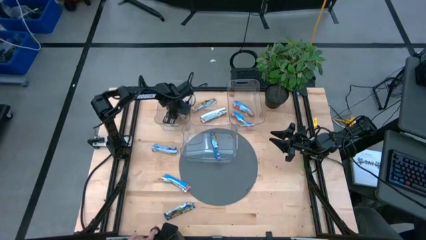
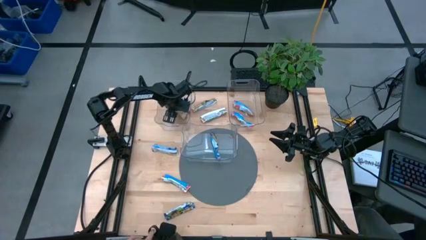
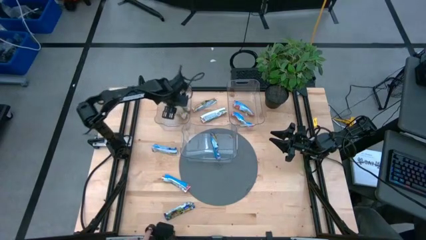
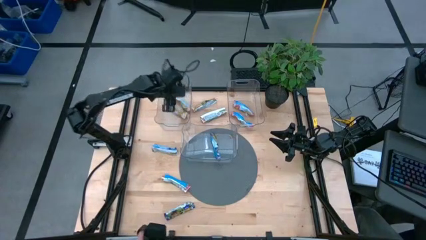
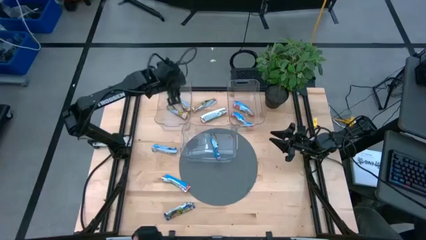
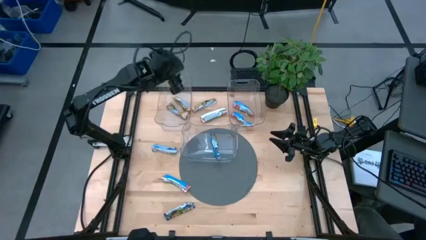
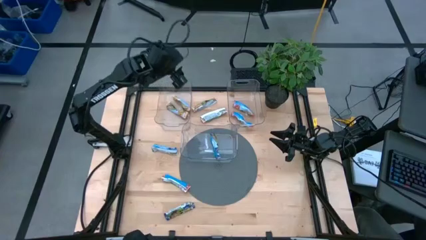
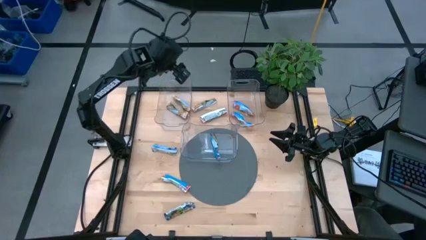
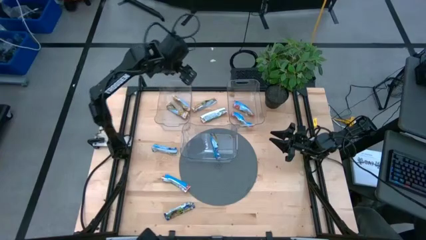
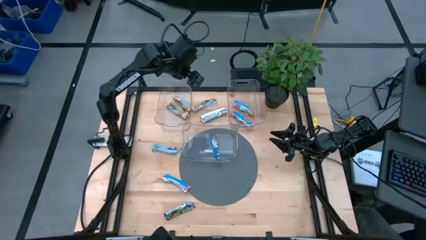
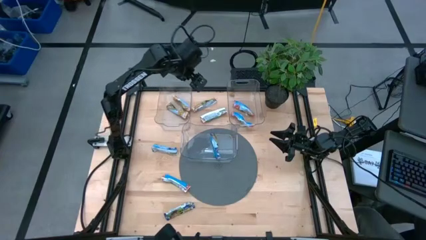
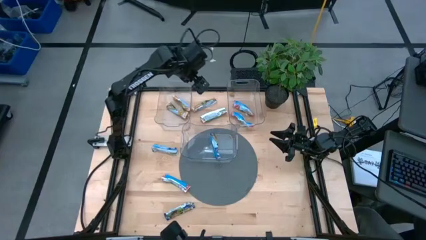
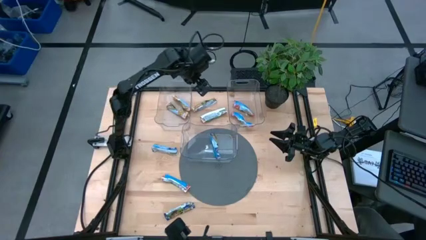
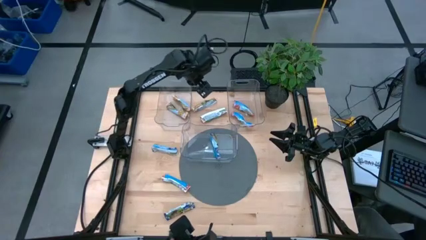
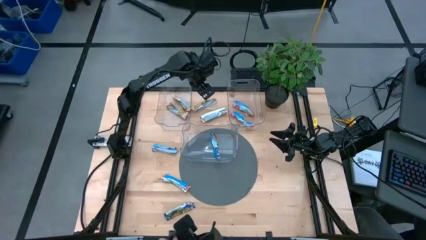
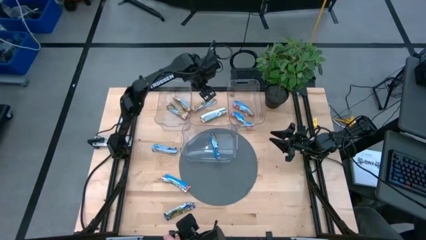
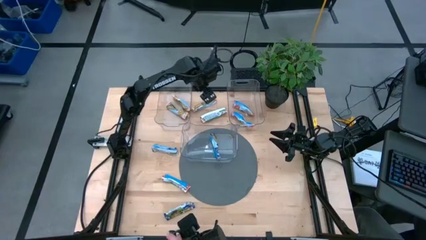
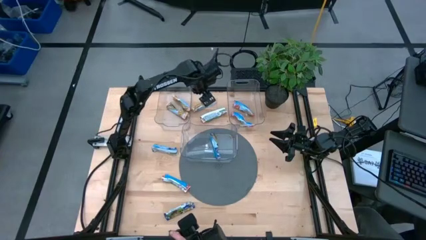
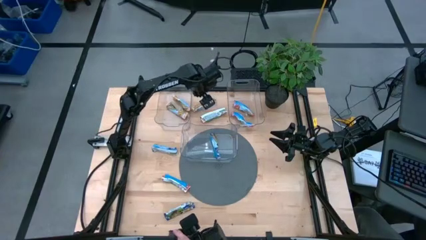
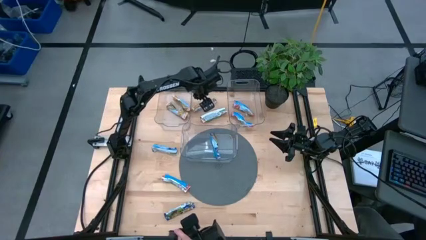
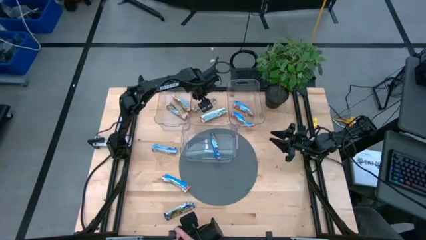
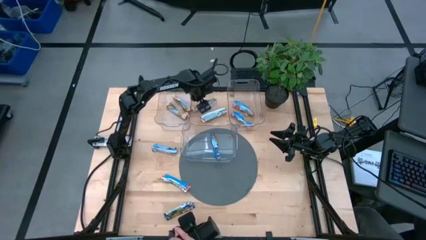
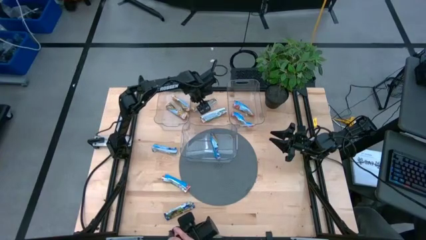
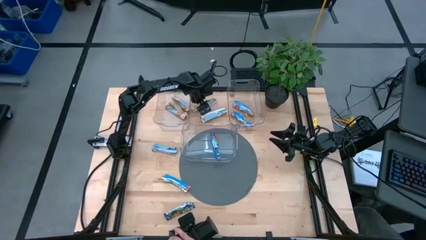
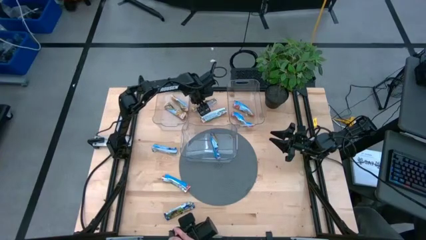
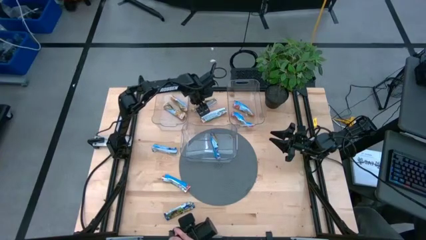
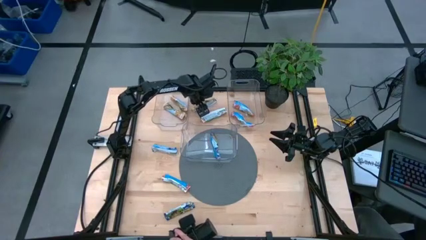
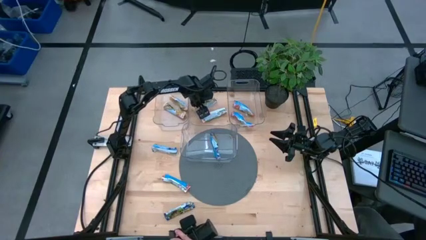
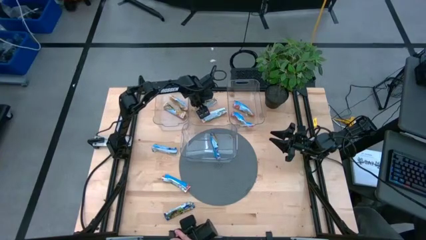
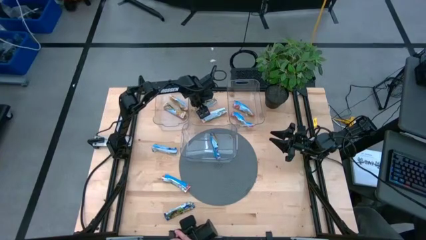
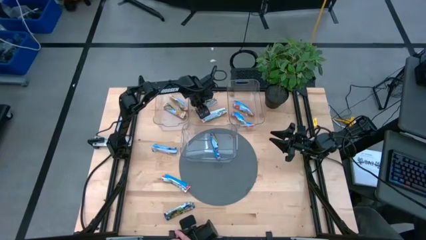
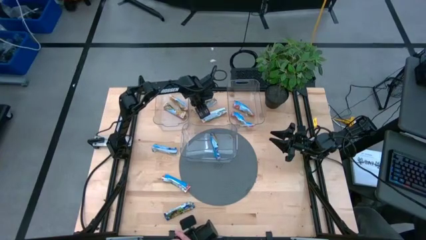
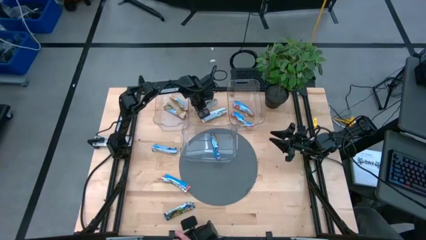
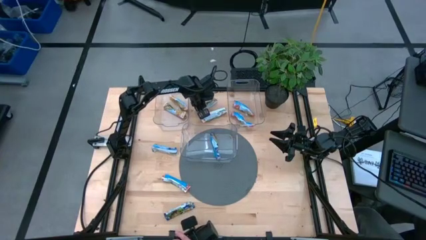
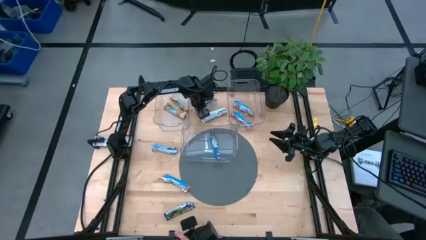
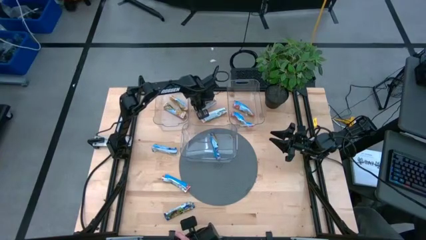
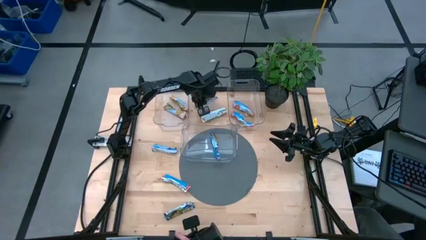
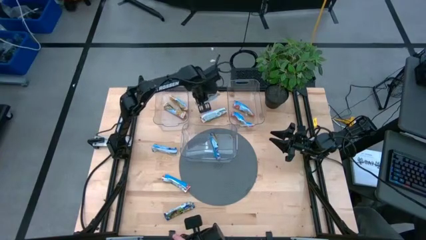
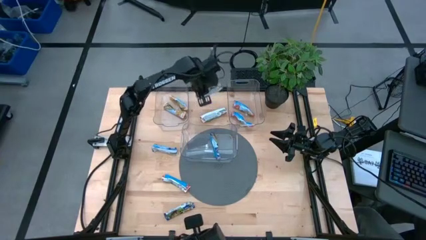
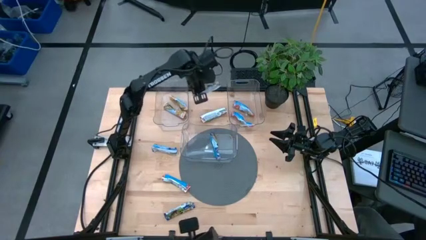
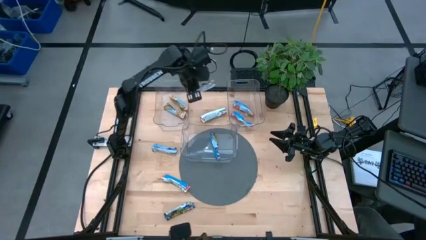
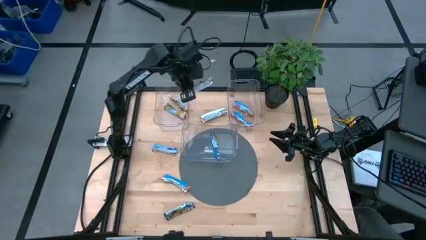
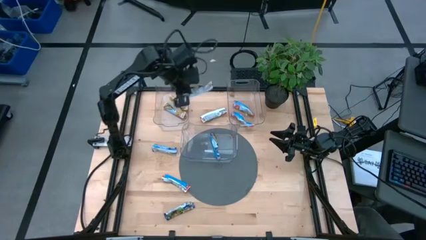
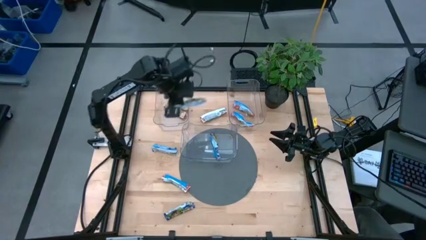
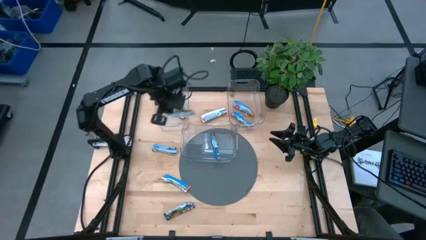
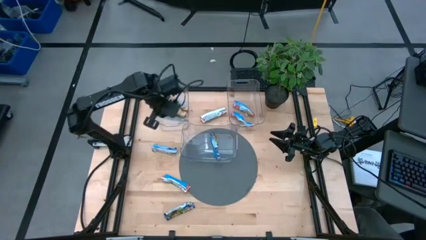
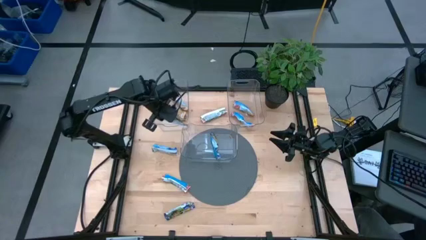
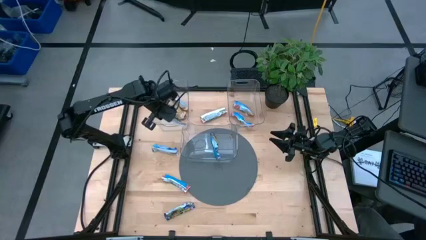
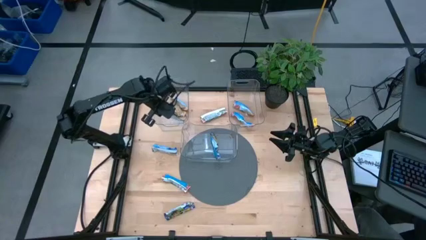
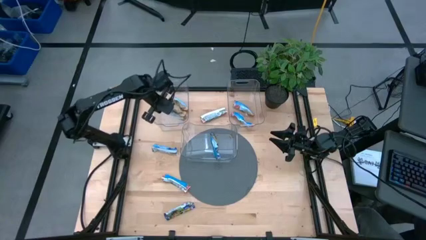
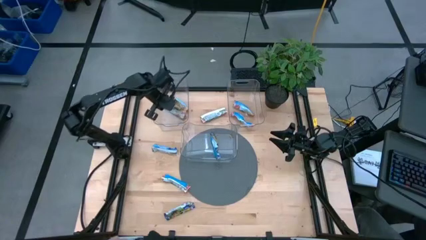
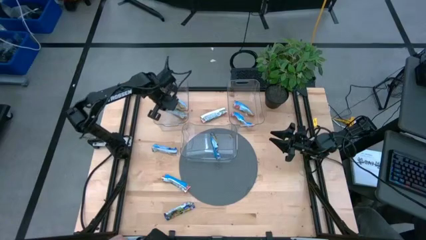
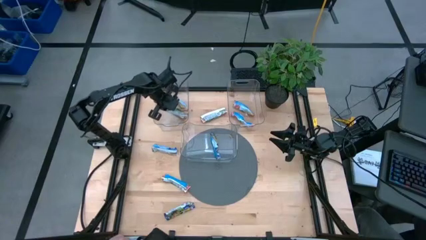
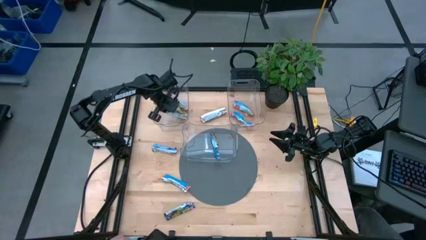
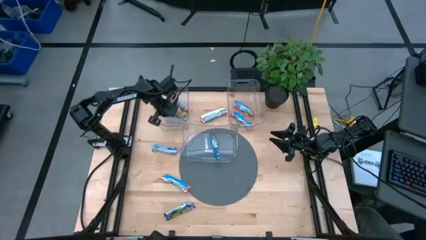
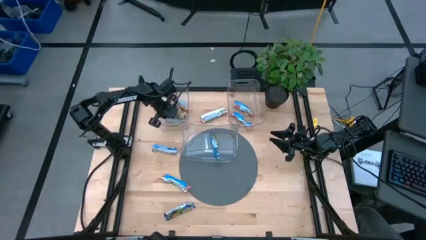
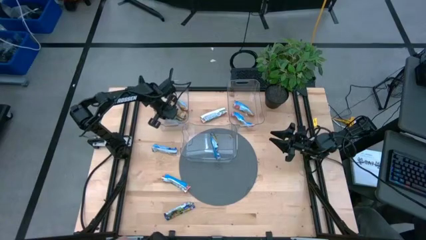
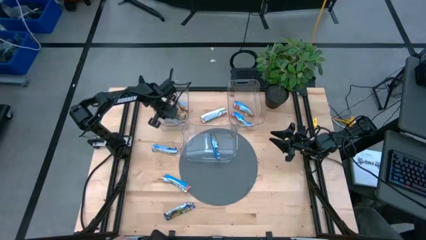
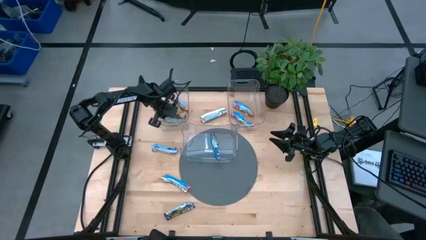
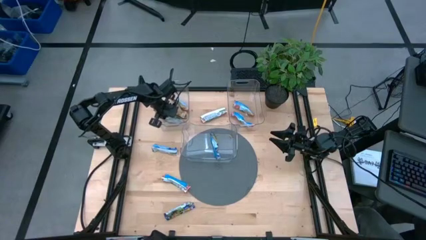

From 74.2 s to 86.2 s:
Task: Pick and place Granola Bars by type
Put the yellow granola bar into the top left transparent bin

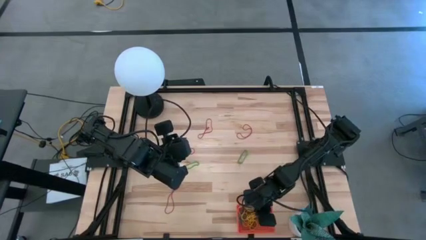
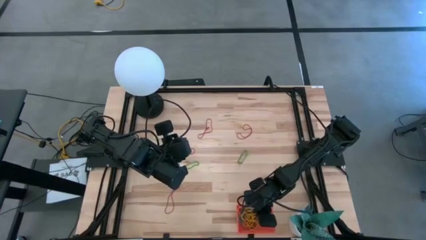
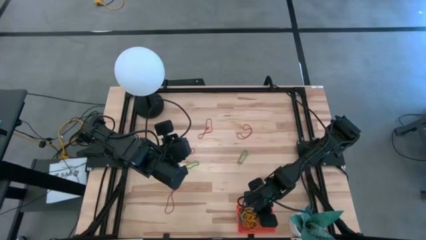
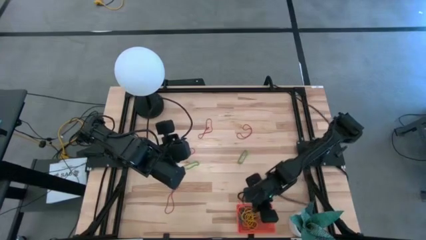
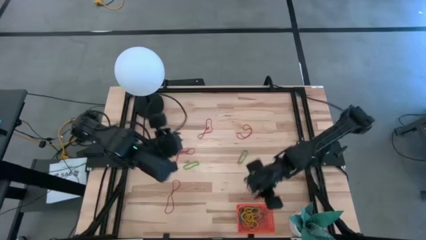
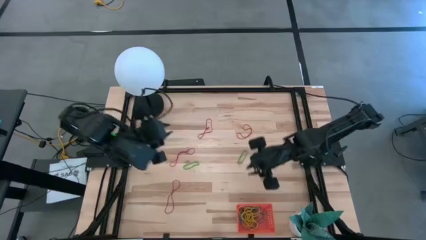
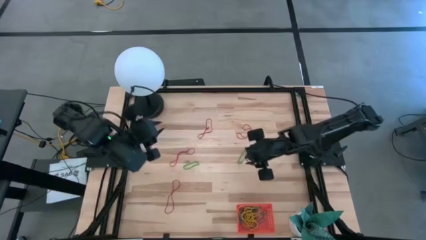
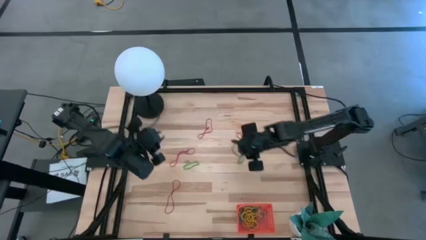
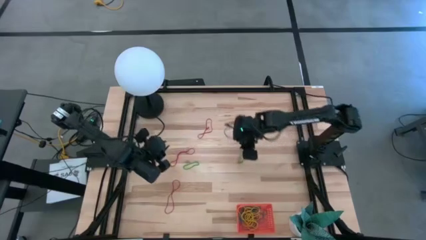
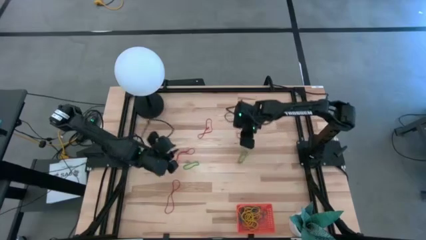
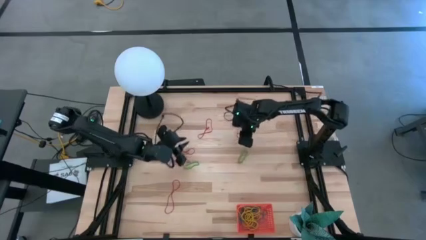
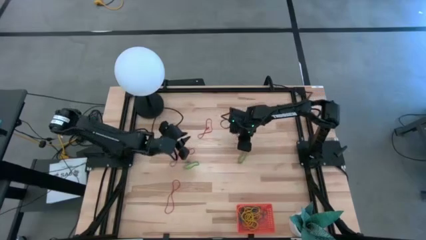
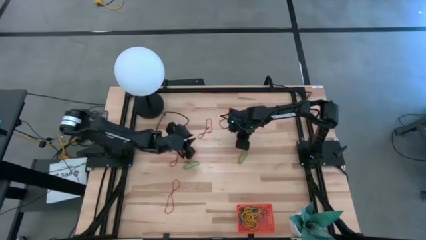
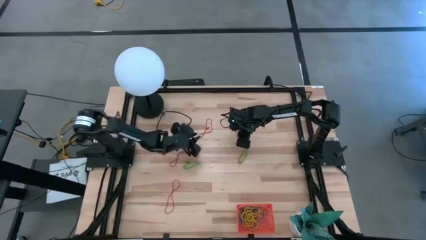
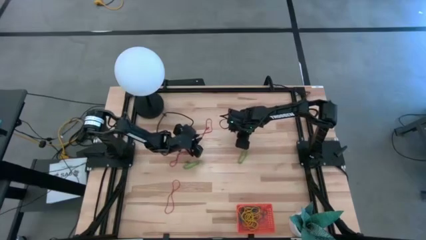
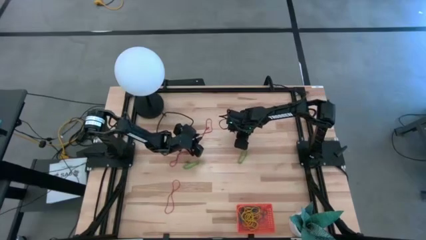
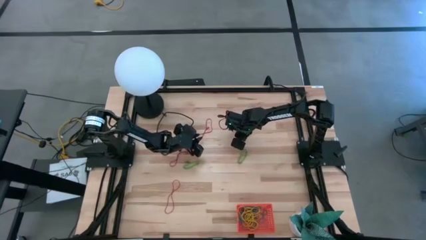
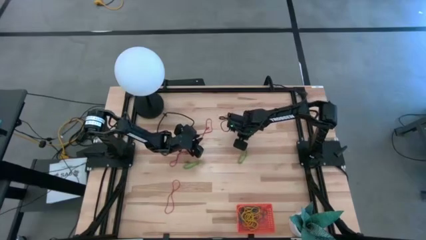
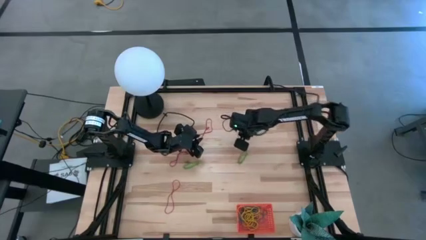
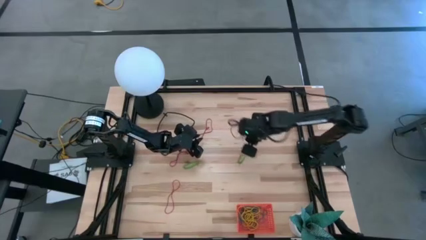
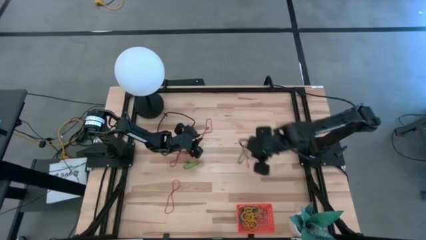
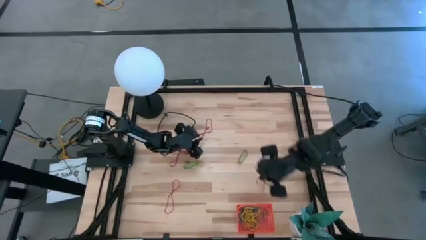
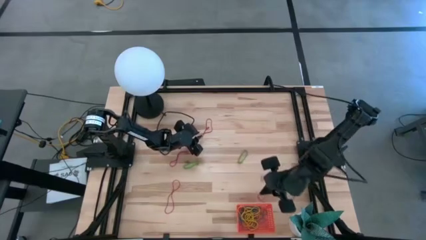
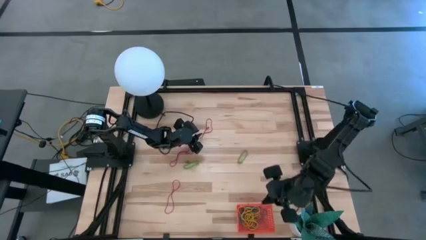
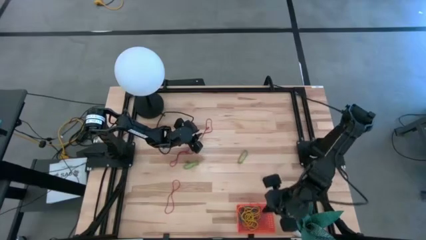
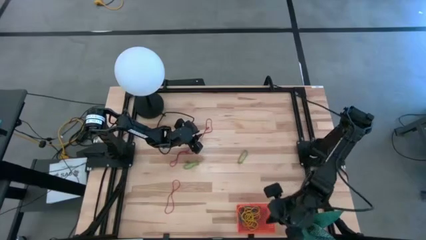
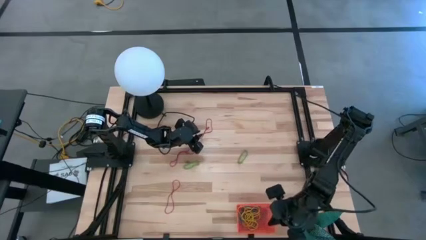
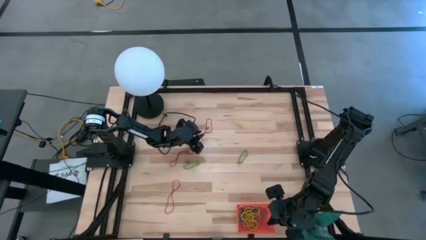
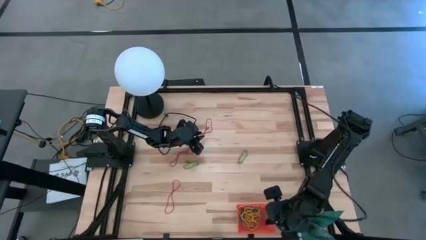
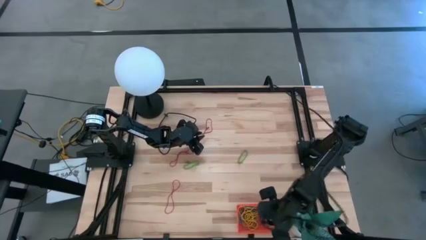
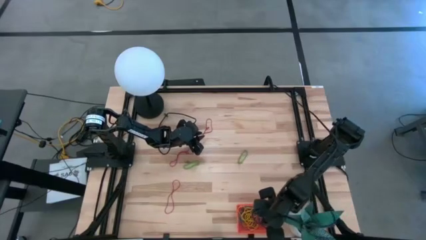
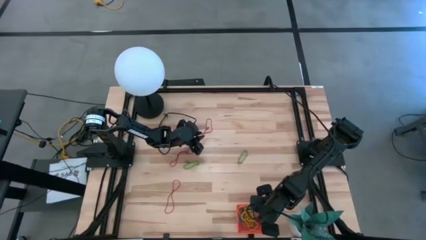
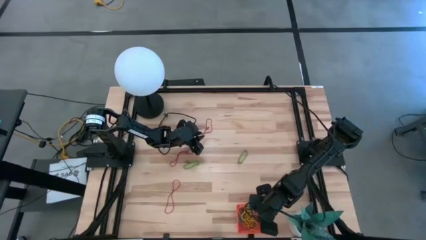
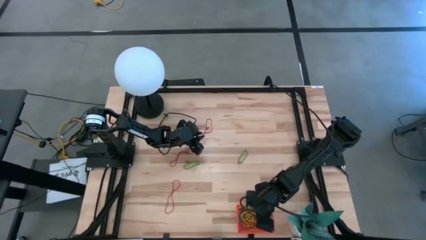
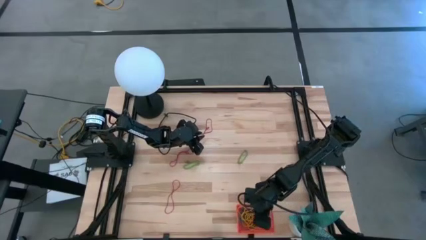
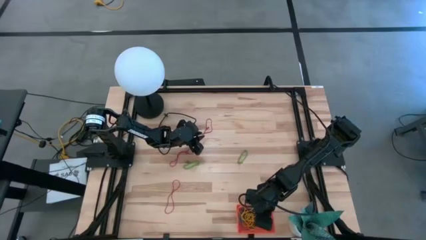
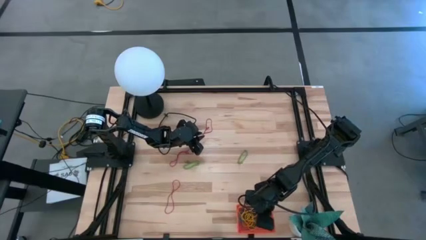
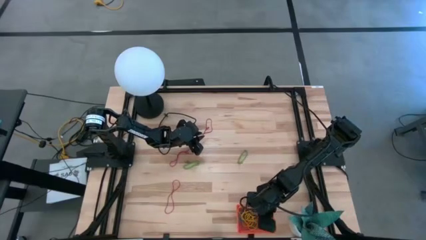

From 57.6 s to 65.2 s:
Task: Pick and place items into bin
Put the red rubber band into the orange bin
